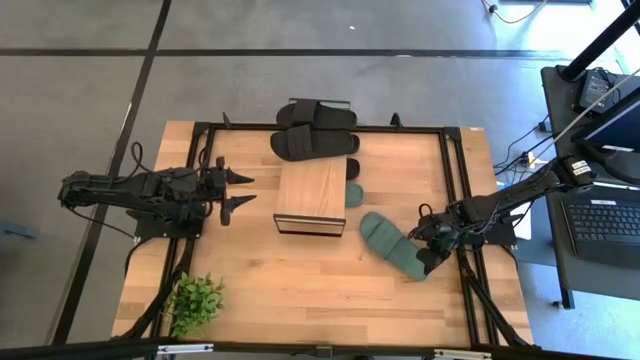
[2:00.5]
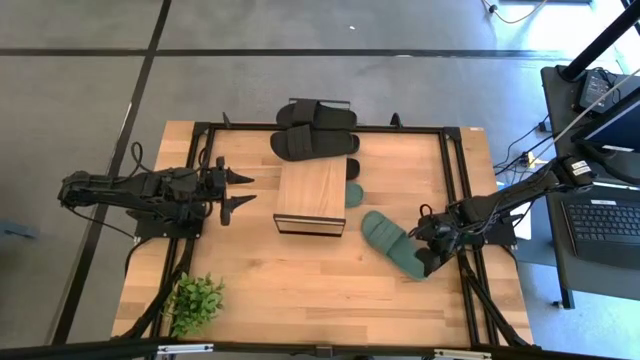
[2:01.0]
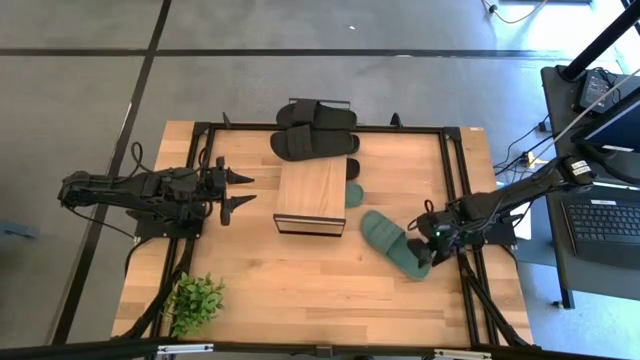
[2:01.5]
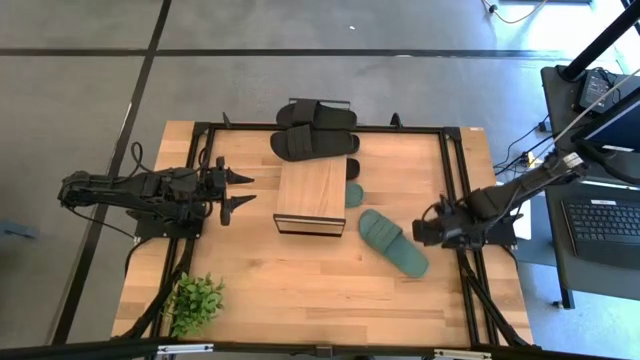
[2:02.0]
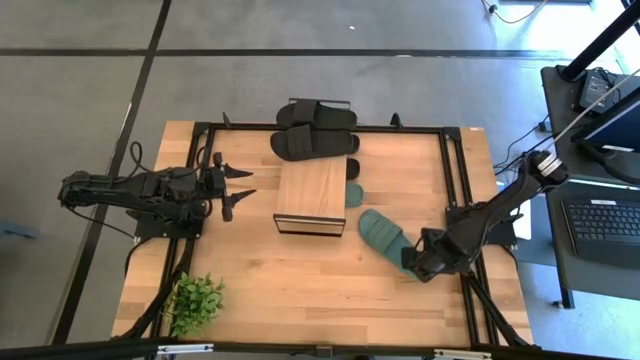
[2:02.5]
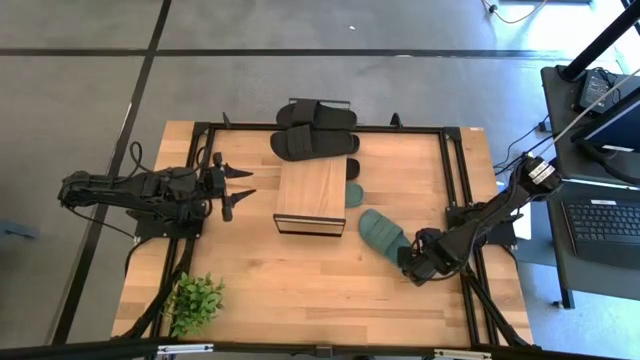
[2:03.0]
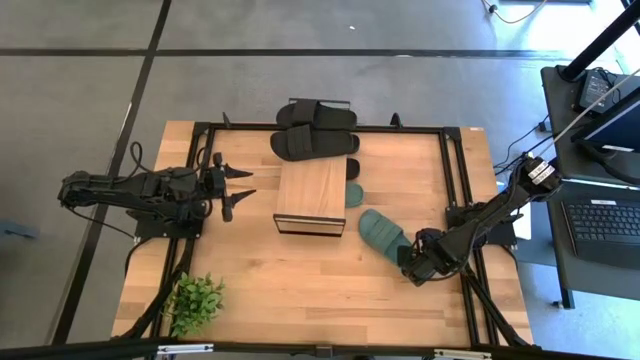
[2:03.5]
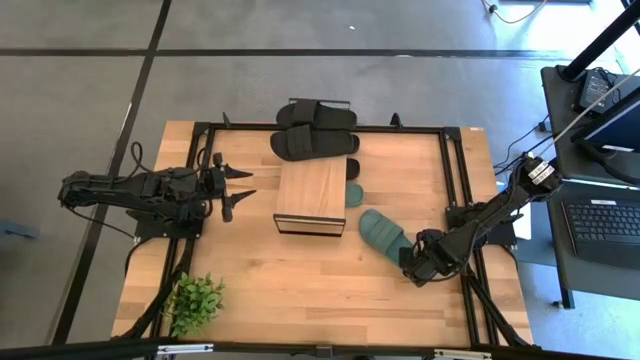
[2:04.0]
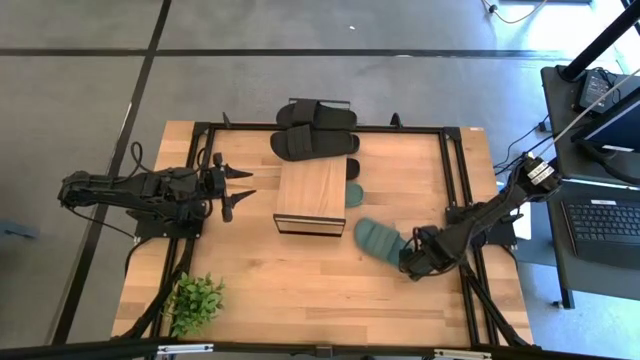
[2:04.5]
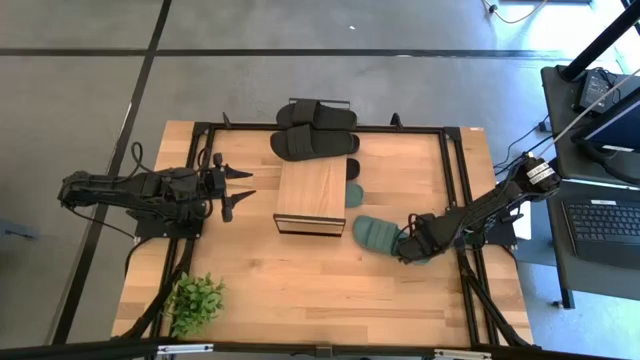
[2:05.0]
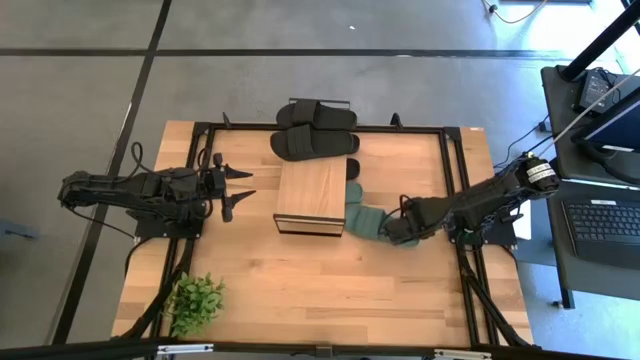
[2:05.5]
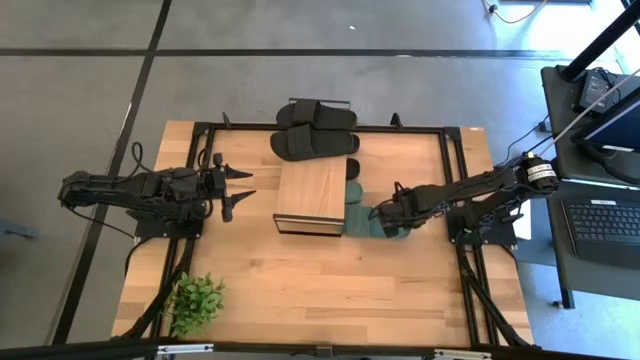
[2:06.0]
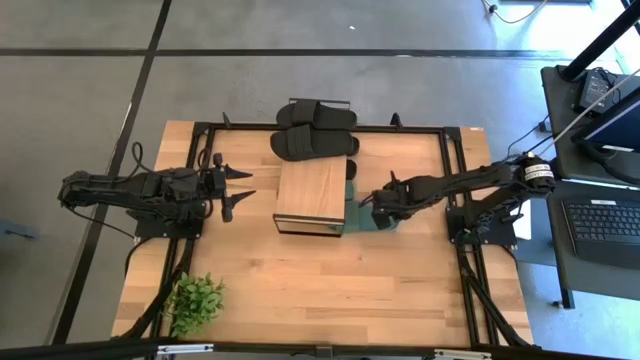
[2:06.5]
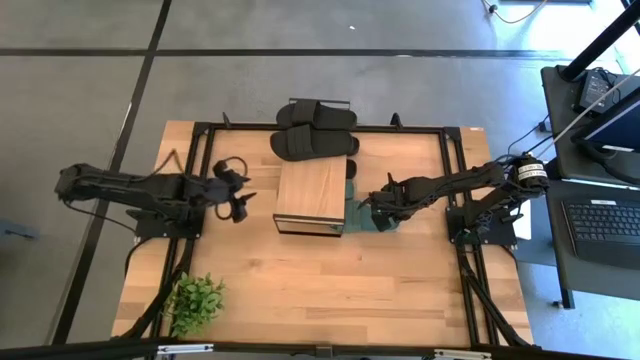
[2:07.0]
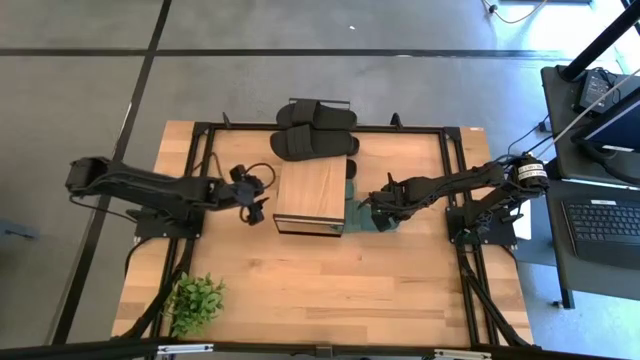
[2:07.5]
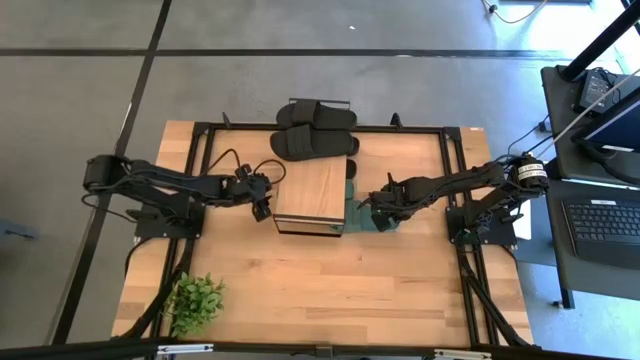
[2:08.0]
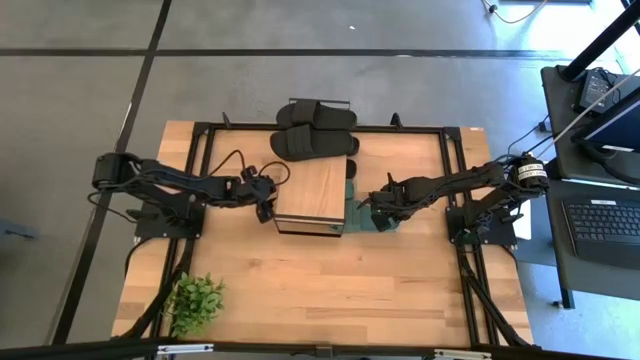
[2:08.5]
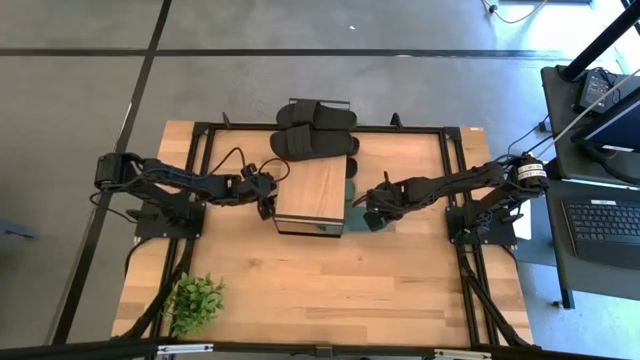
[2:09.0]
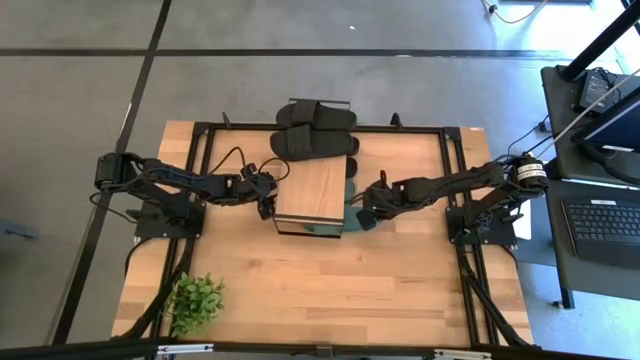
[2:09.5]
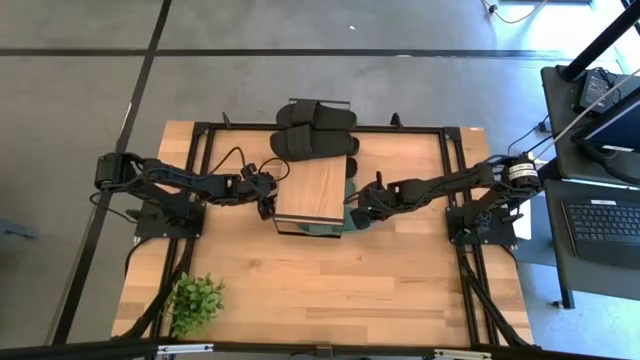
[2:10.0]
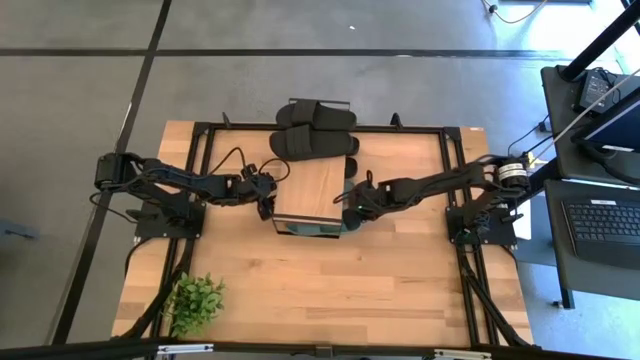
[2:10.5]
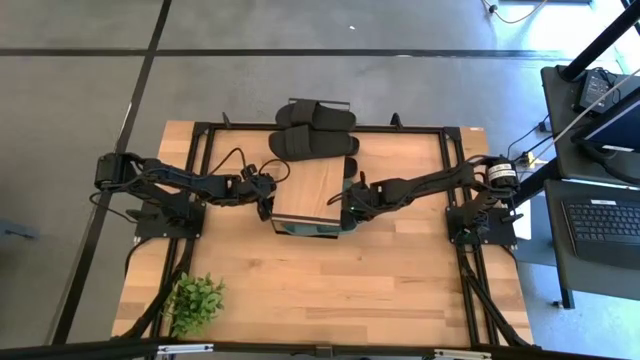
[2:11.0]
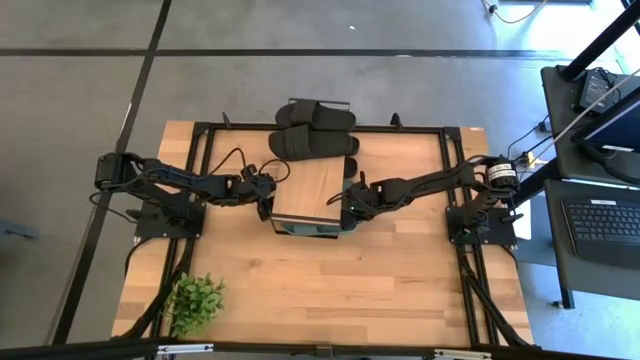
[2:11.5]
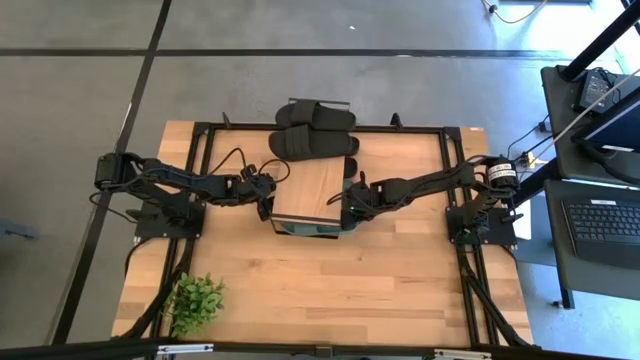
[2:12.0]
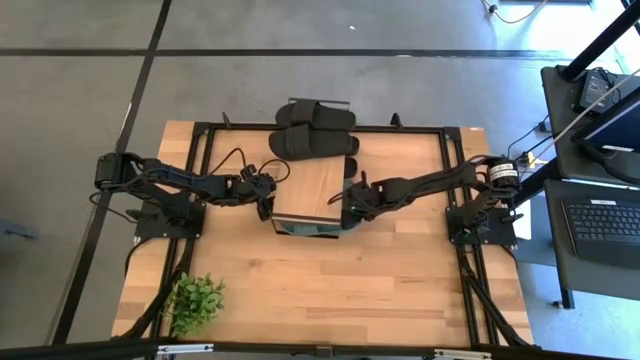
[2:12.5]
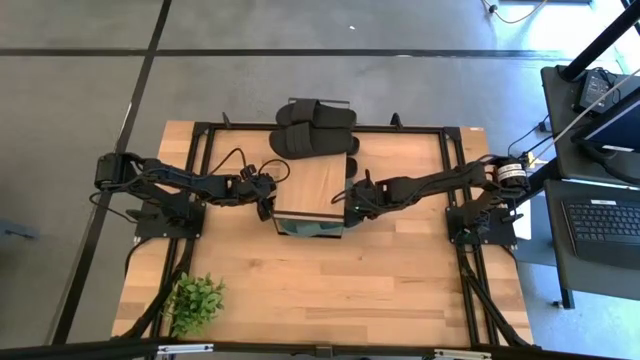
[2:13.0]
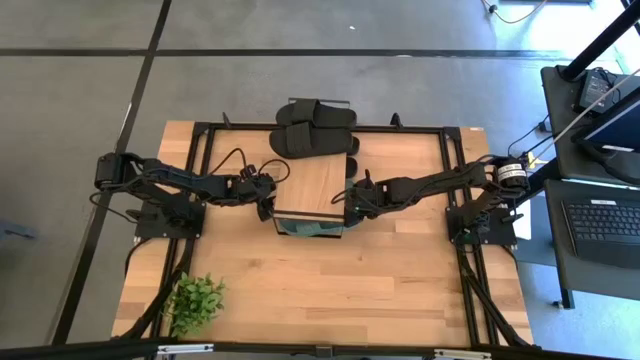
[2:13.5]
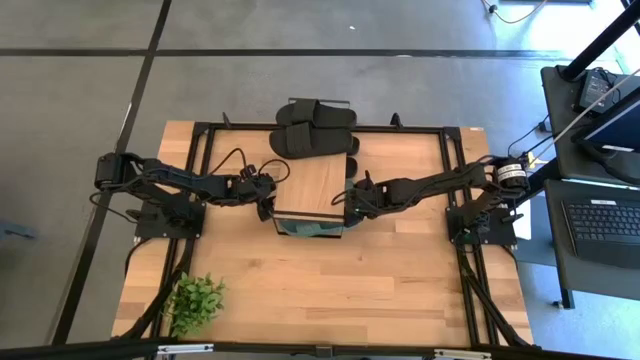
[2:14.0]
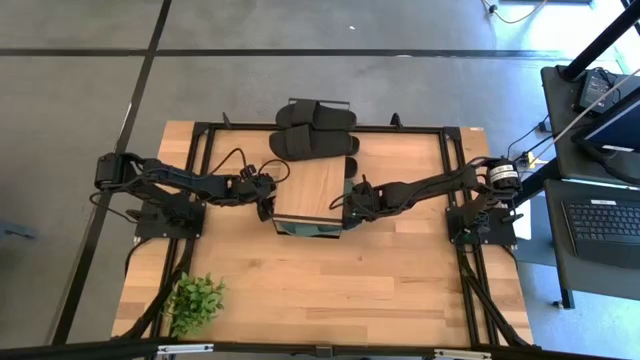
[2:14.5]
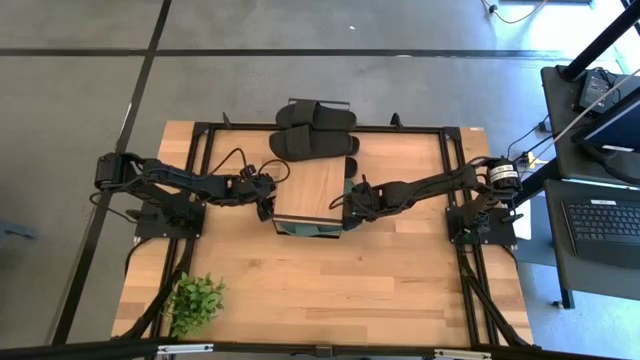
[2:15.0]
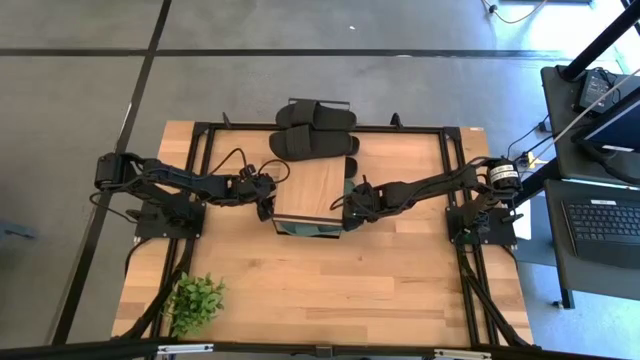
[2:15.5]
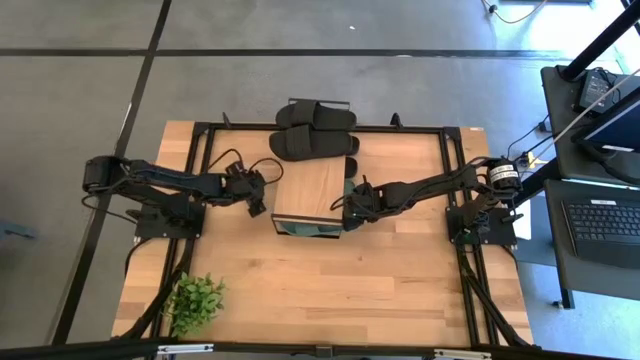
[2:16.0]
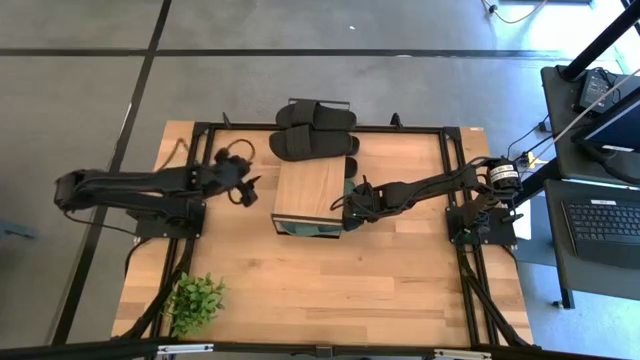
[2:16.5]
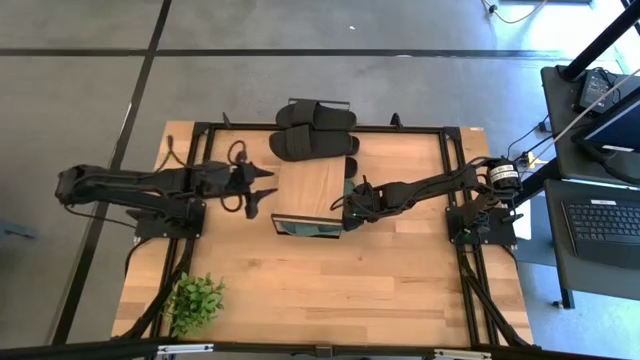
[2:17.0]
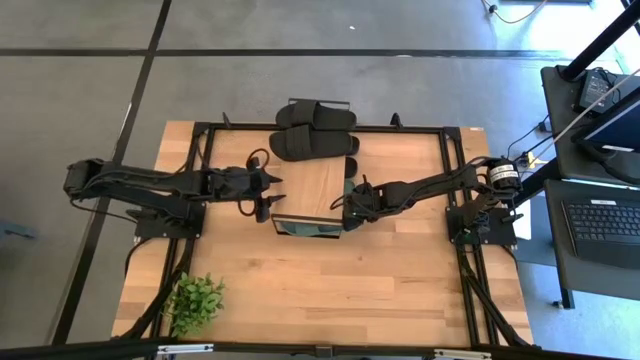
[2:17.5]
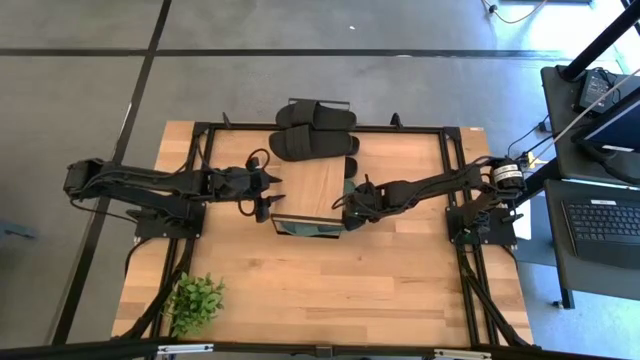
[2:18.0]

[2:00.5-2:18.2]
Task: Pick and place slides into the shelf
Put the green slipper under the shelf

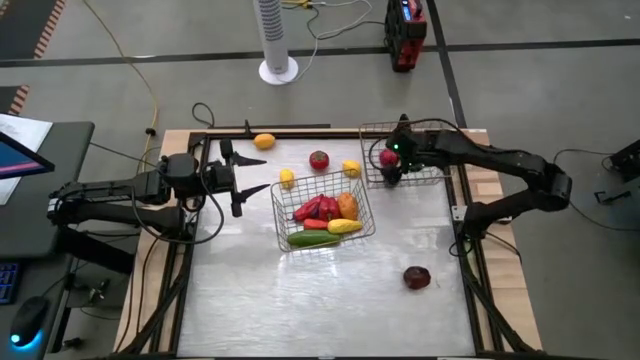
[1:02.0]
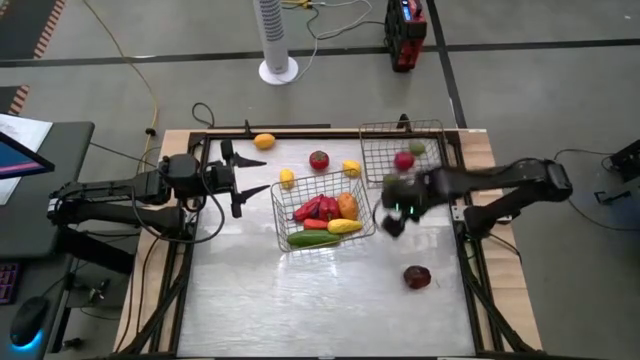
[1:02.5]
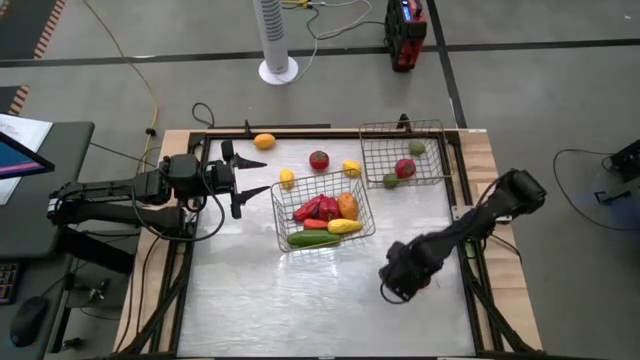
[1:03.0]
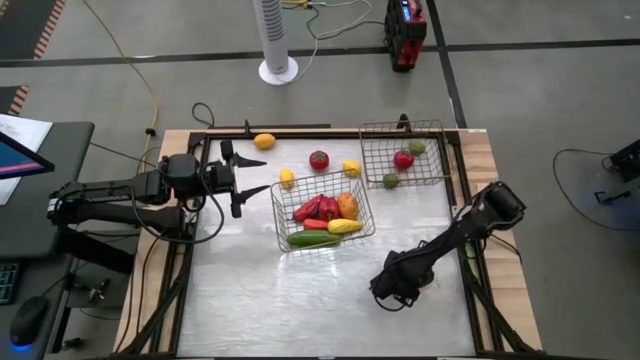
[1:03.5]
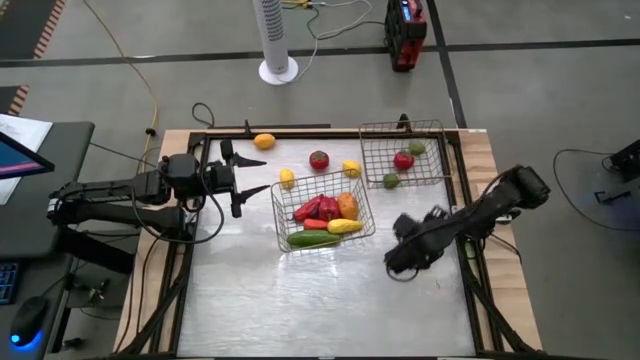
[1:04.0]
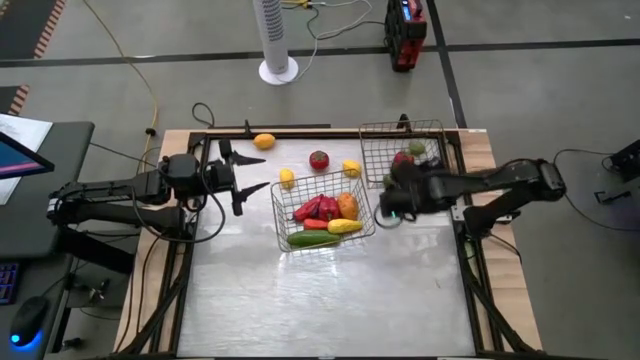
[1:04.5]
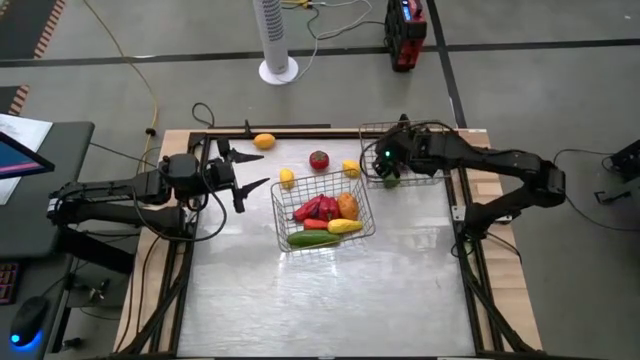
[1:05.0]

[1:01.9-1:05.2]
Task: Sort produce into baskets
Put the red apple into the right wire basket
